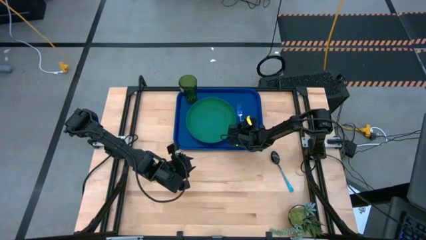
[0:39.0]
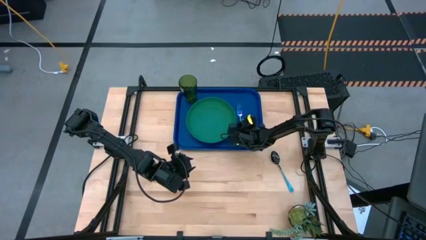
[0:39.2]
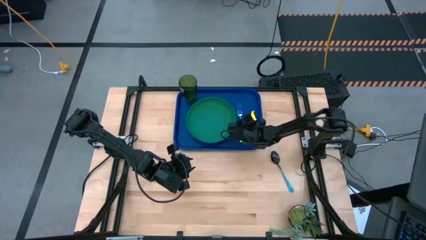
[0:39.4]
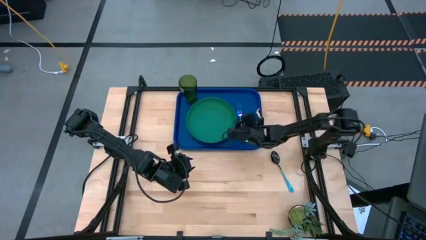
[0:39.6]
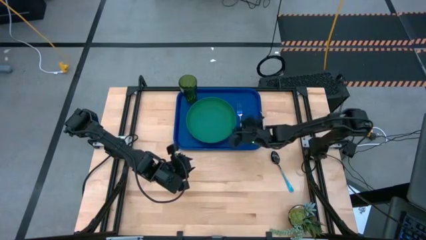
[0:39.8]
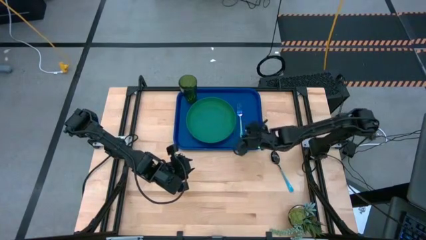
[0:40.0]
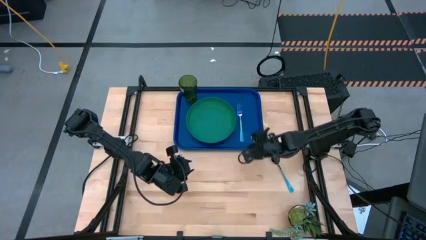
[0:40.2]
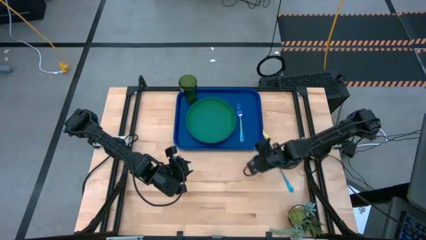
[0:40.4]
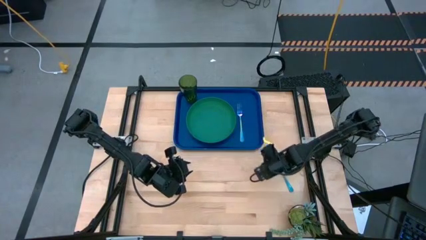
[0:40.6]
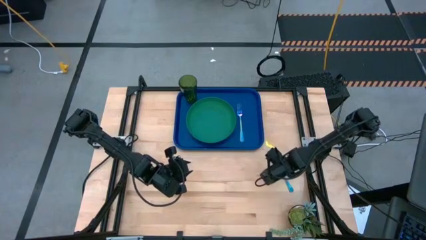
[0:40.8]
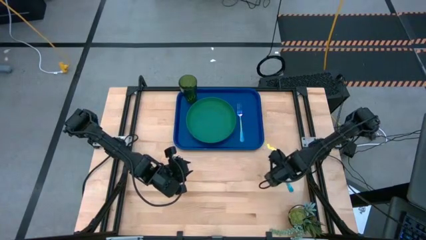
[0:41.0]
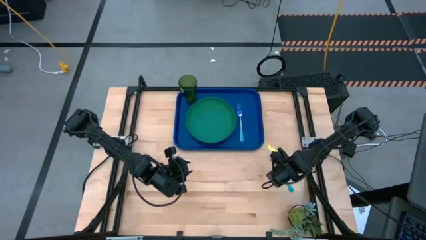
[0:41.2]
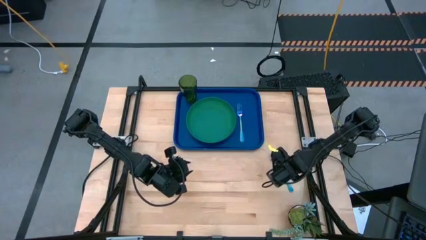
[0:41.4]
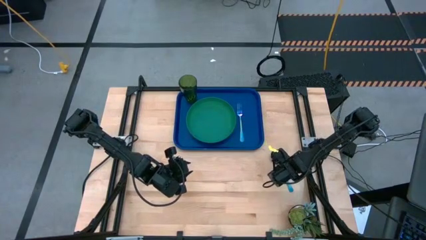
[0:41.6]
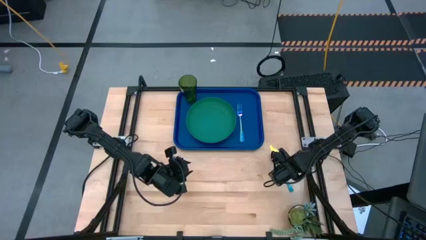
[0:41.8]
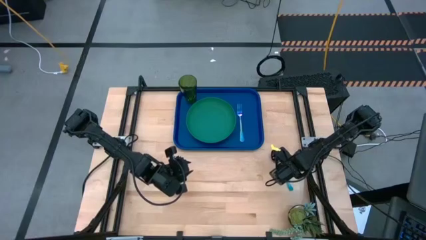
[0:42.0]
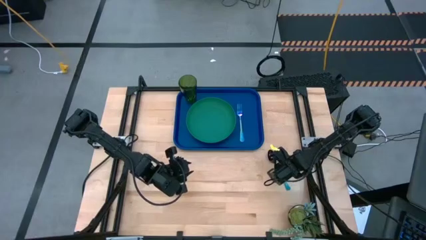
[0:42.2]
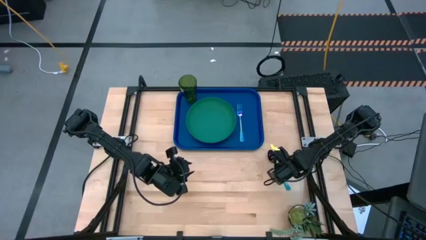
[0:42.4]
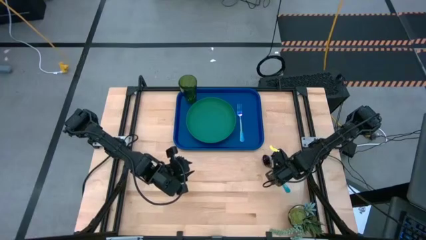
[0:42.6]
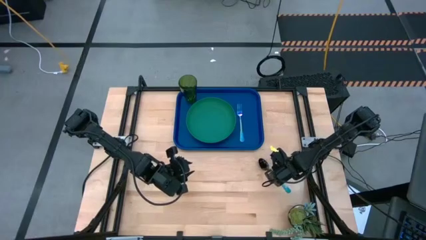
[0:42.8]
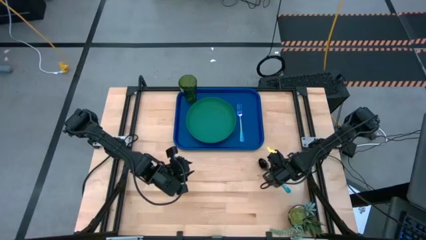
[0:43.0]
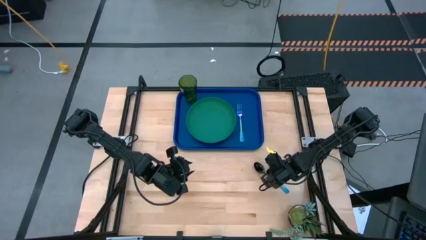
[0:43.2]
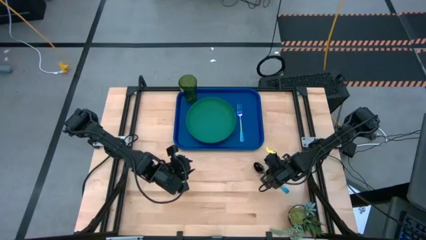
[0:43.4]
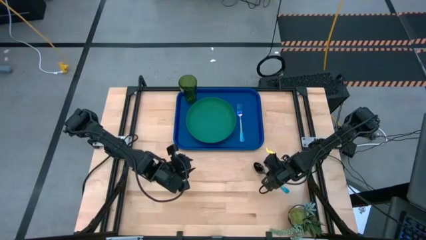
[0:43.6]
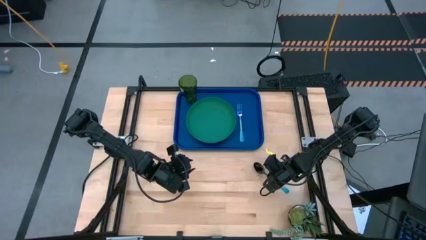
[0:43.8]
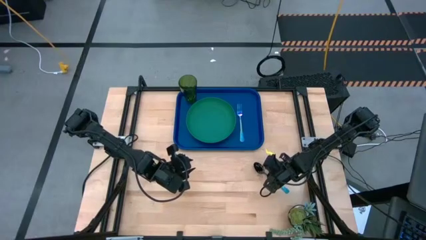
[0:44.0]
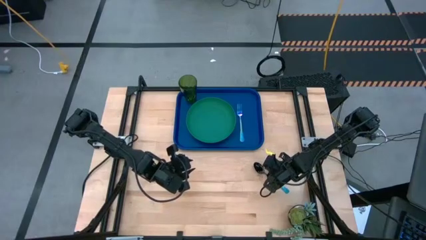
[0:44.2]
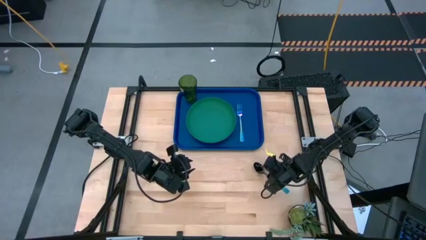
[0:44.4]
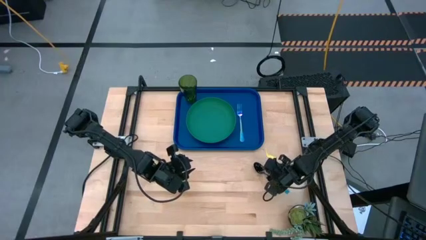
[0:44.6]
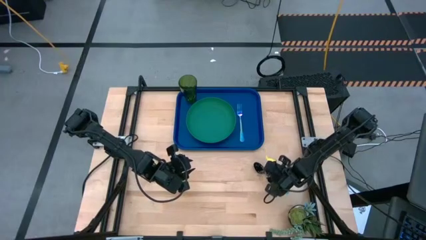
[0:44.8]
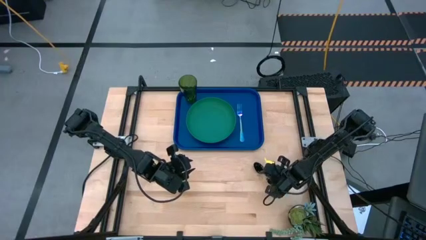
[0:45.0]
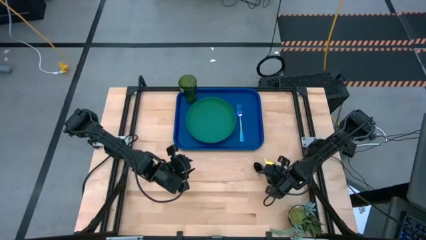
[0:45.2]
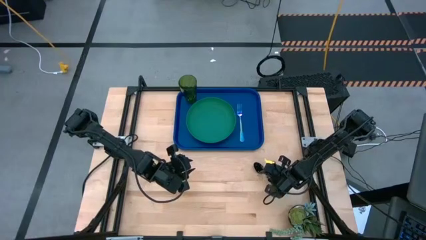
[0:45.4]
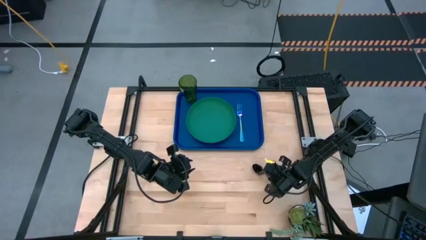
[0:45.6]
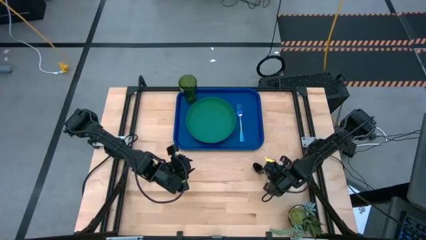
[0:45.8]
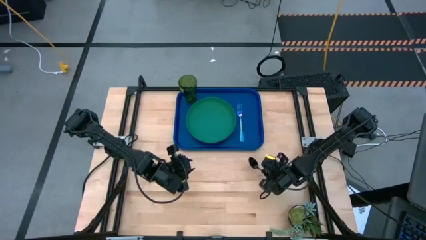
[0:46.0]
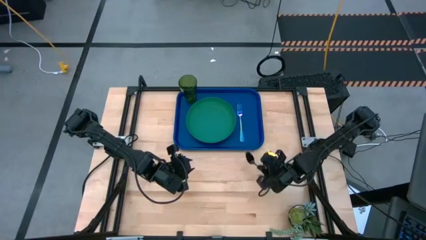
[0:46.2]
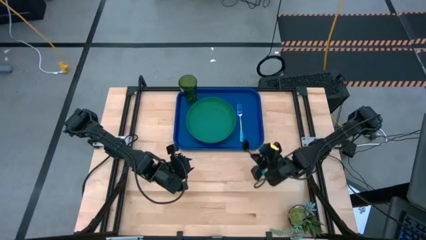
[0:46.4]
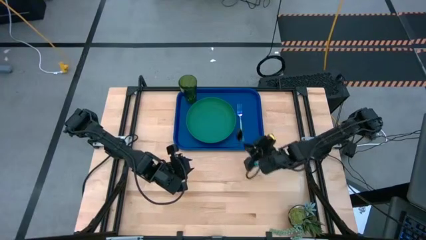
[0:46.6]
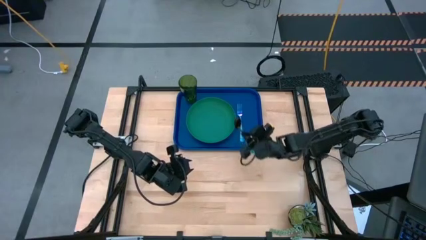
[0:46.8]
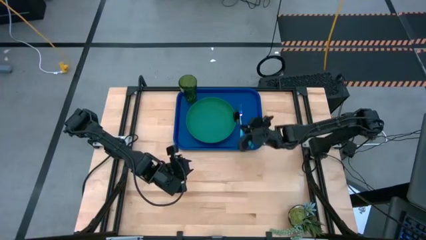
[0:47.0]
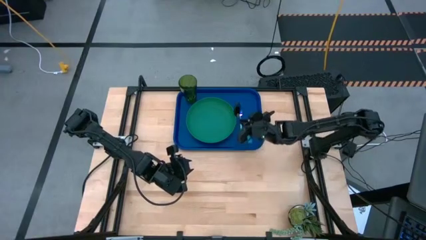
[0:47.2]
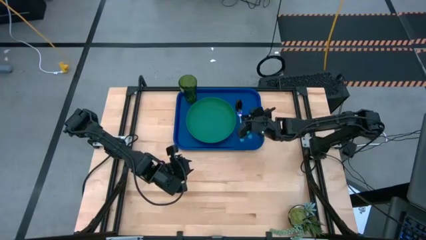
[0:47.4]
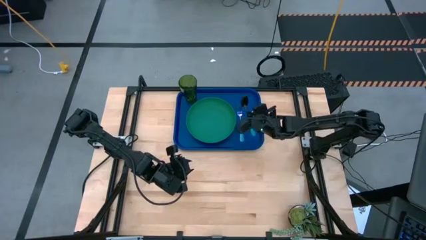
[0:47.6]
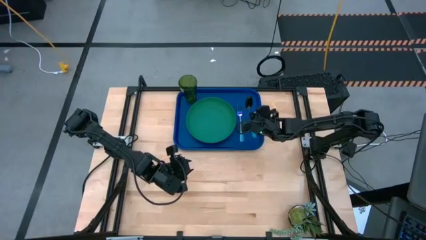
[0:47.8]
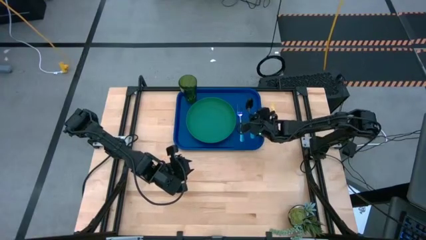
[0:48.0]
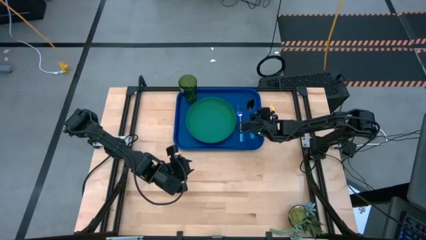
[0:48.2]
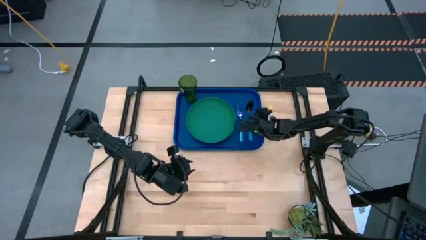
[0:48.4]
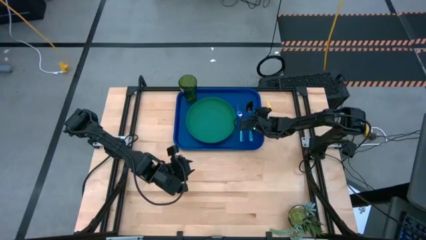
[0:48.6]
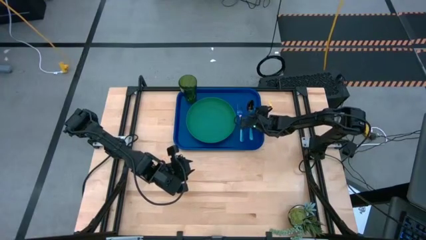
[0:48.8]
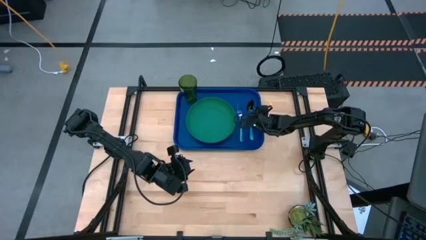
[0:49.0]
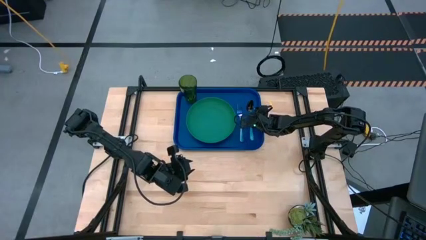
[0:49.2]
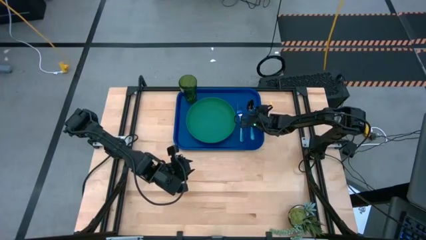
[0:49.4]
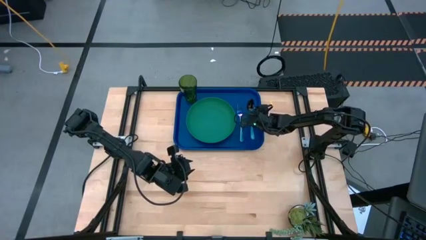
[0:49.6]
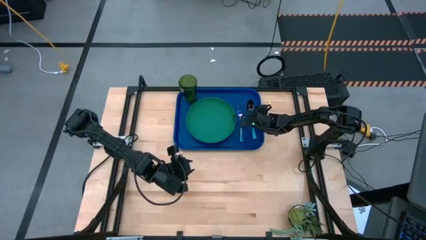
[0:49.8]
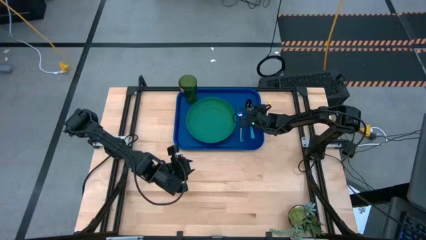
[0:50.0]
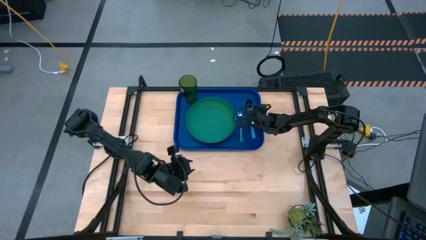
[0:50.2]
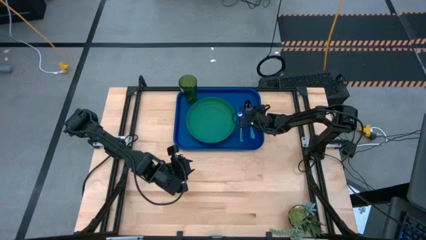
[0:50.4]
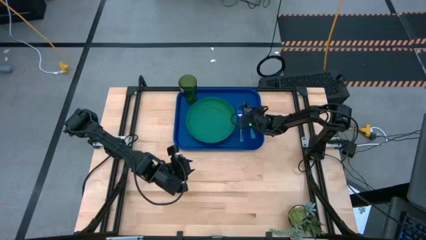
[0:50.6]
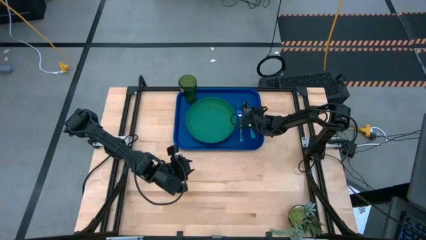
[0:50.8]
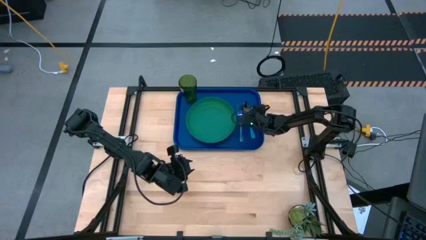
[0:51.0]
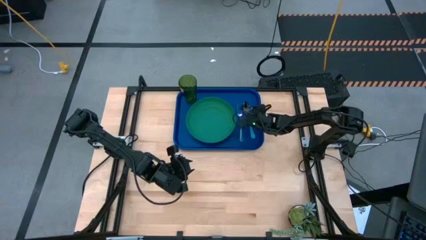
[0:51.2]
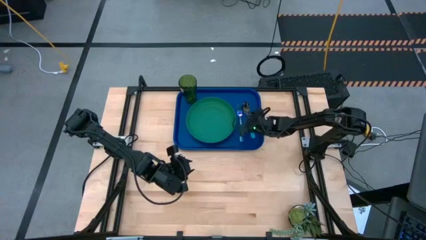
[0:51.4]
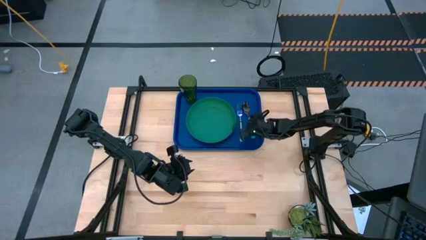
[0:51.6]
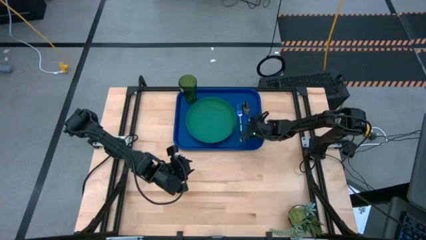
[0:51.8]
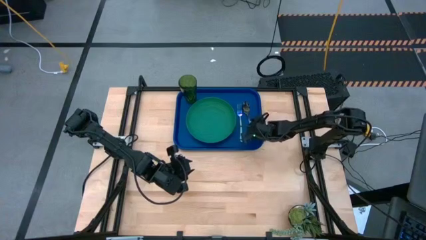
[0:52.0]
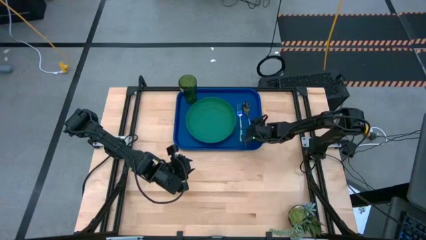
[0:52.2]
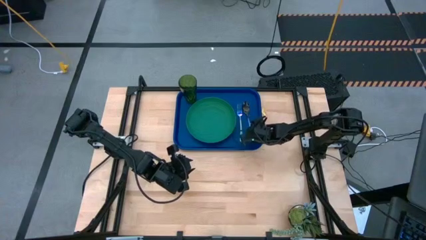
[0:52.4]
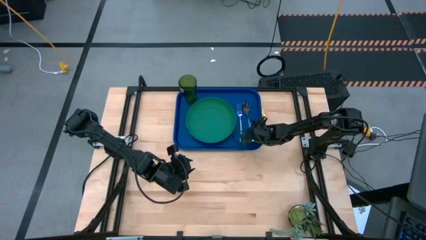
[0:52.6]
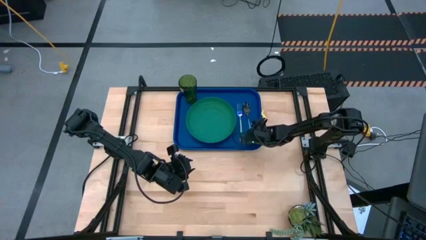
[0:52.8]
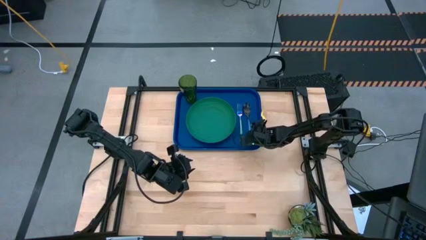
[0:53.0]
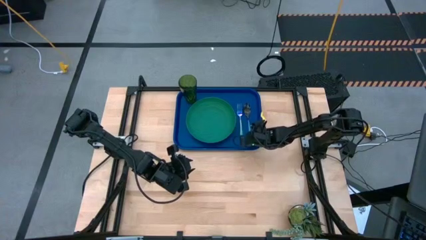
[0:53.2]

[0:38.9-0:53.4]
Task: Pick and place plate/cup/fork/spoon on tray
Put the blue spoon to the right of the blue fork on the blue serving tray
